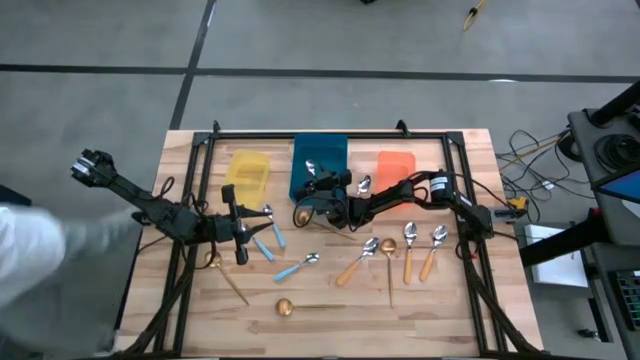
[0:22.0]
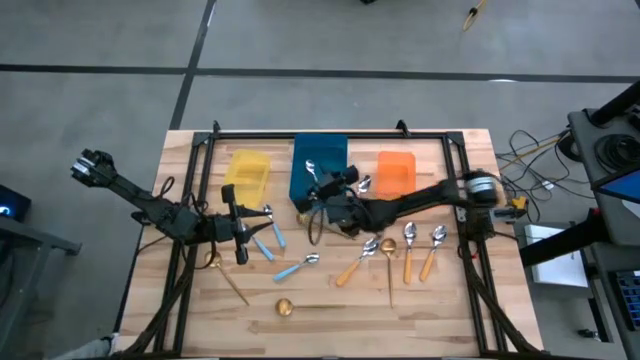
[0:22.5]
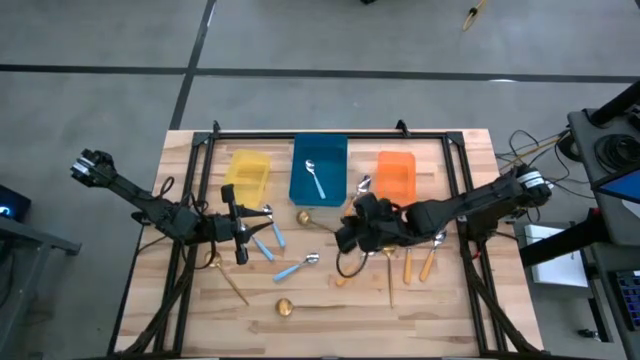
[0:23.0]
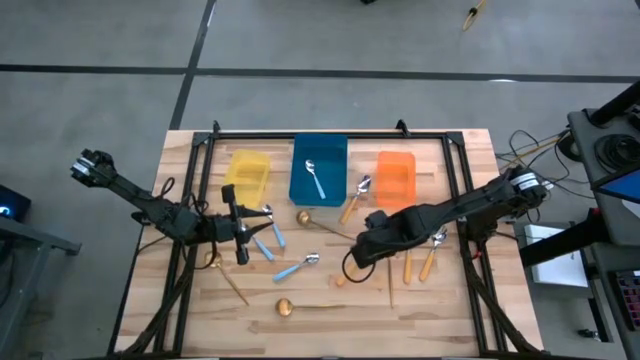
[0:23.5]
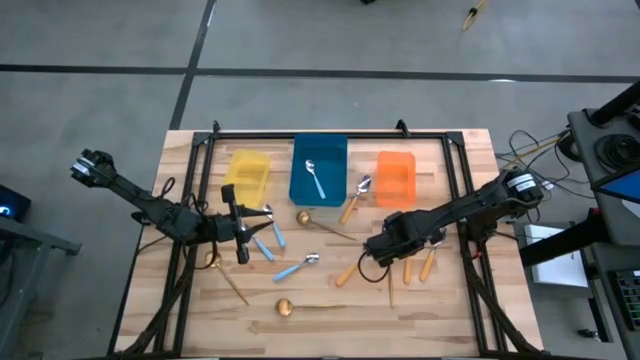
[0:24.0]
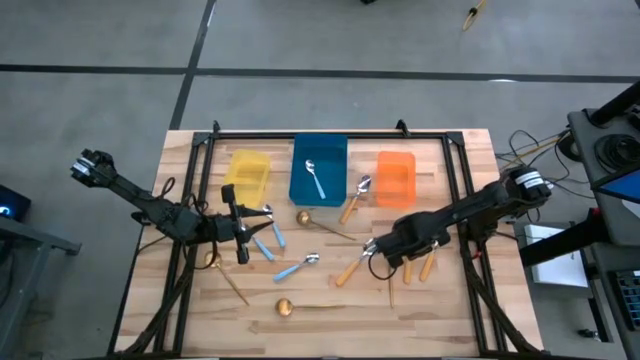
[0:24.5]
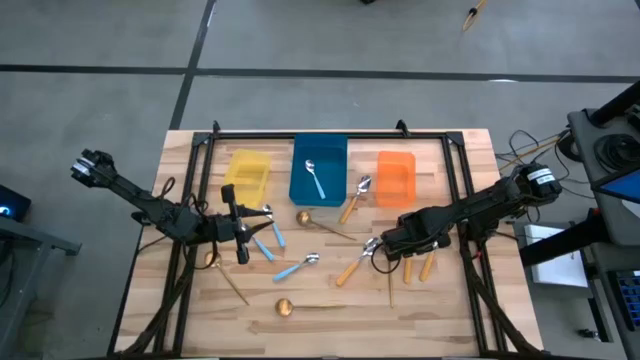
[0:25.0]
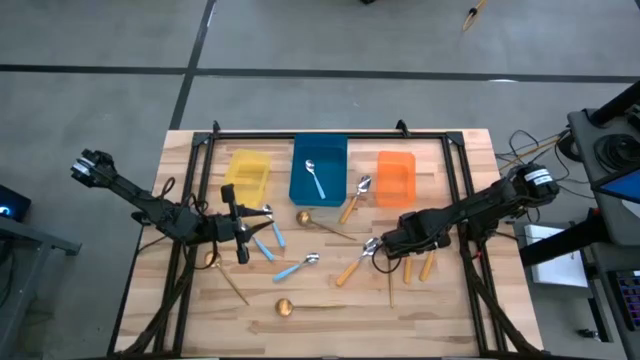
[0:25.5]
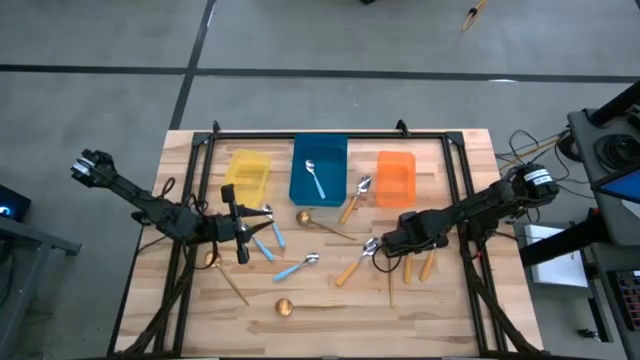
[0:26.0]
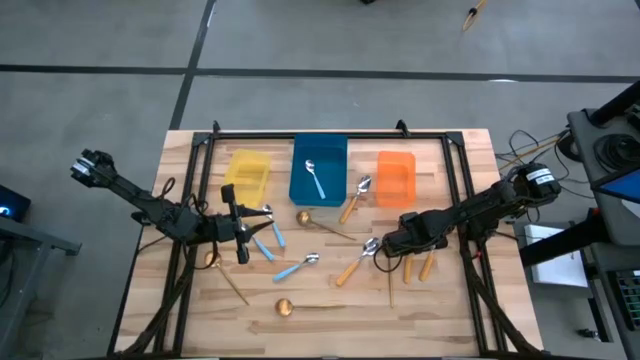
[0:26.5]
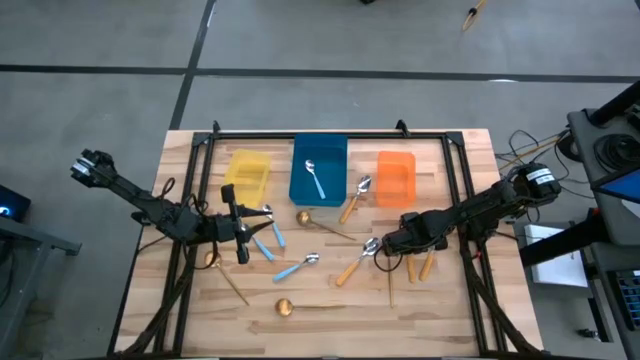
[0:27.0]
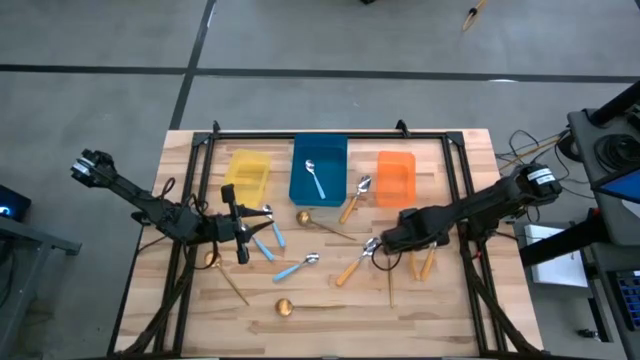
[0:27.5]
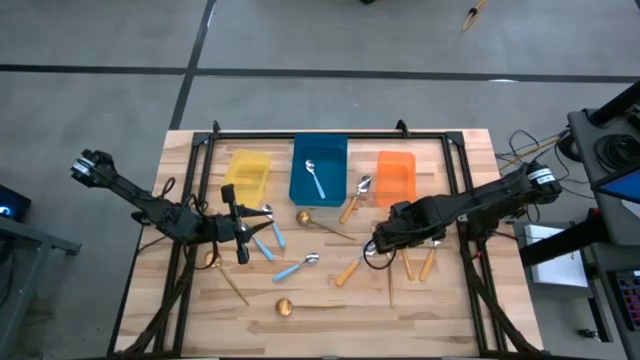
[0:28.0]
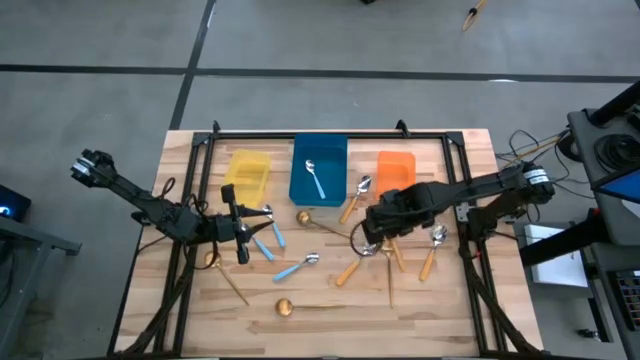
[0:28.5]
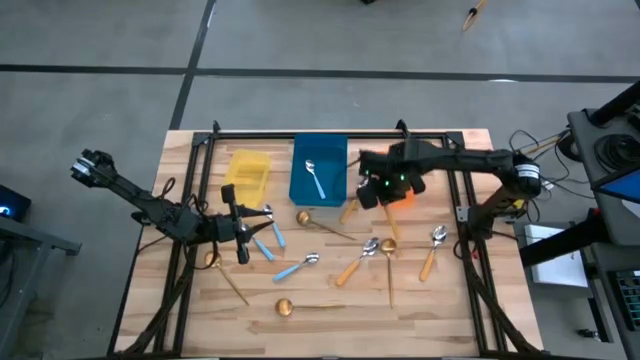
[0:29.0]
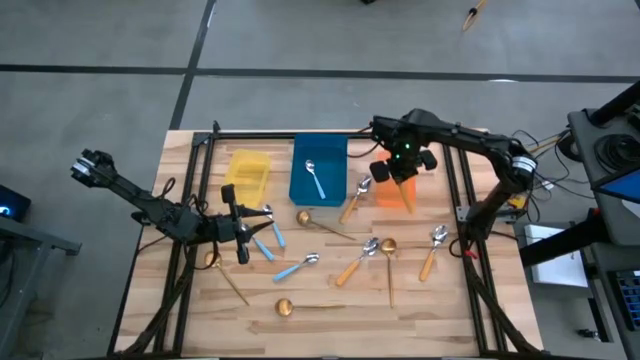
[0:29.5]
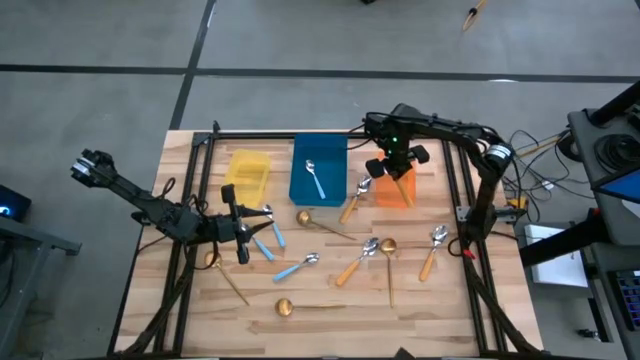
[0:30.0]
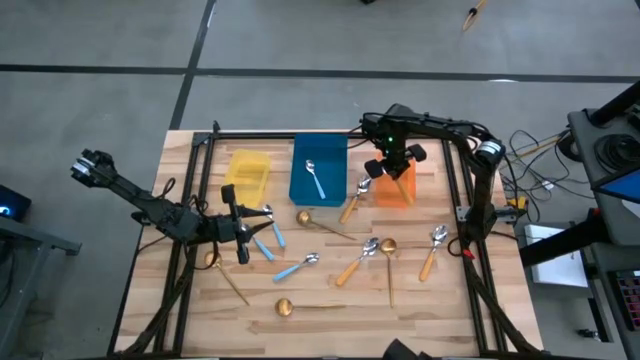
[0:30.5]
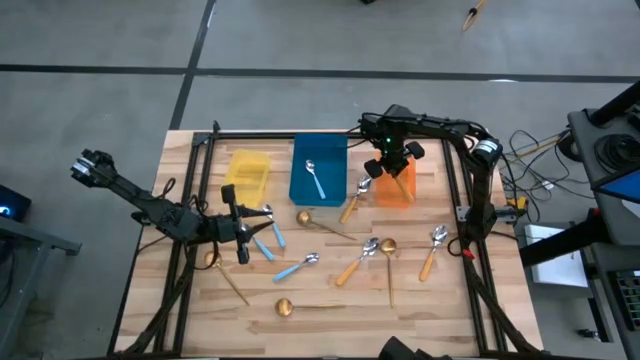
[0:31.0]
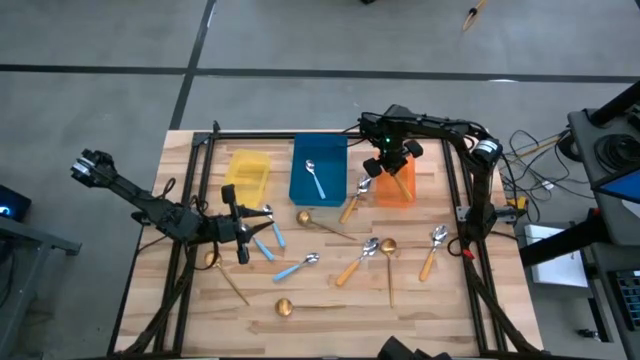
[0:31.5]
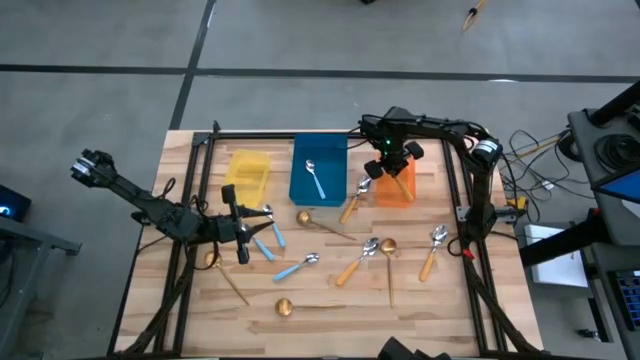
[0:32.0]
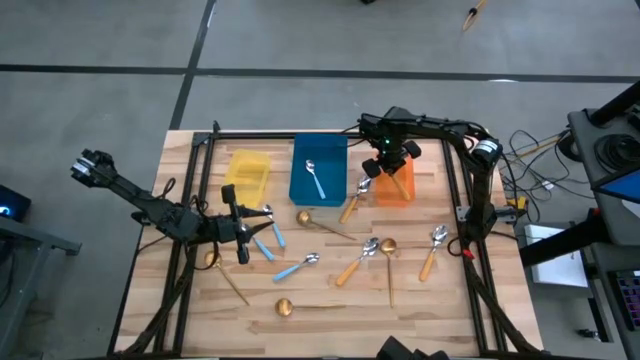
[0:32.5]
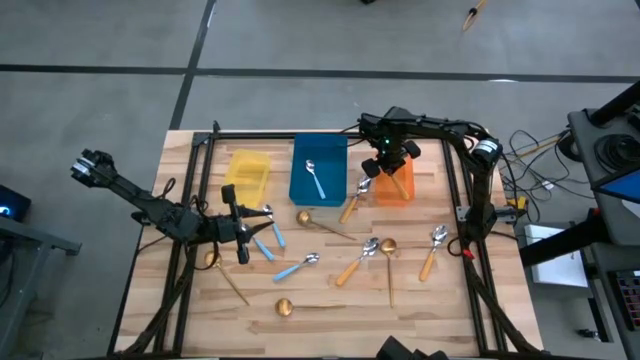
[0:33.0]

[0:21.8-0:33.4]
Task: Sort silverware by color (type)
Put the yellow spoon into the orange bin

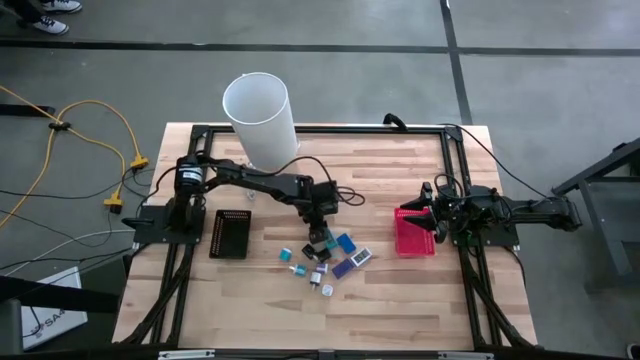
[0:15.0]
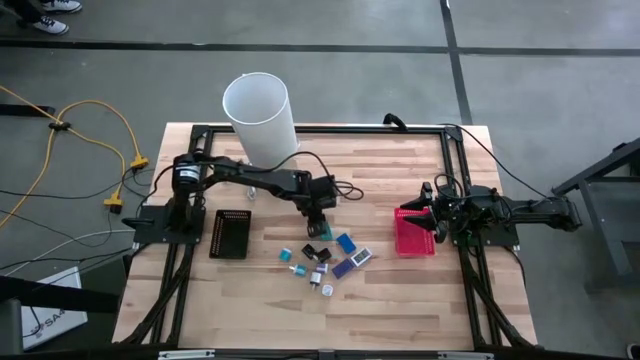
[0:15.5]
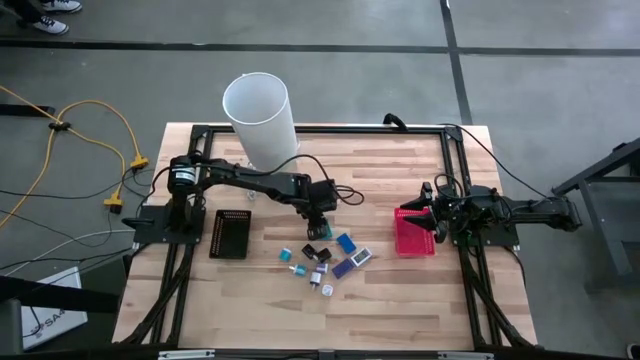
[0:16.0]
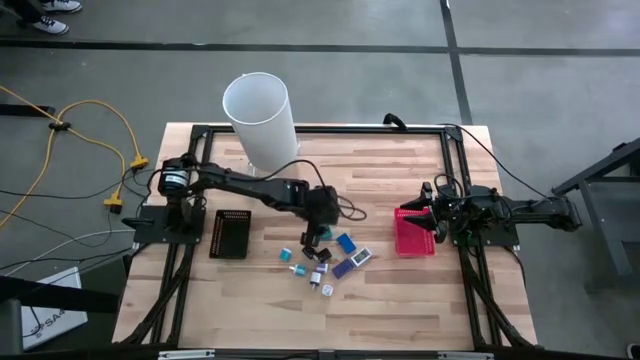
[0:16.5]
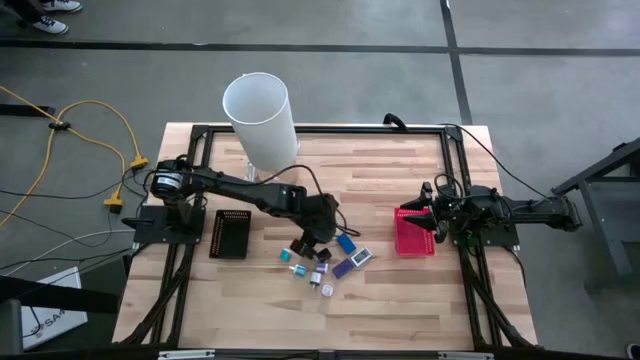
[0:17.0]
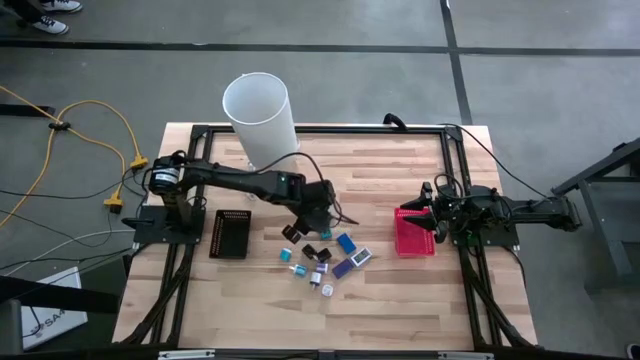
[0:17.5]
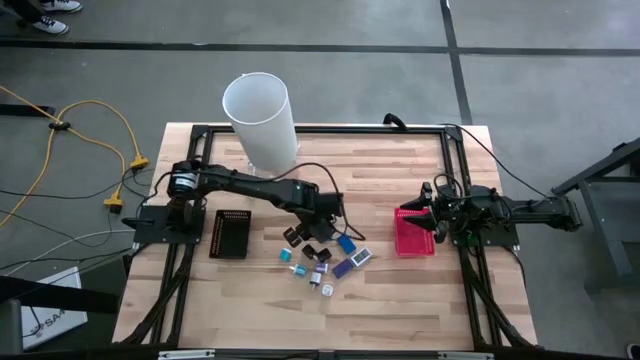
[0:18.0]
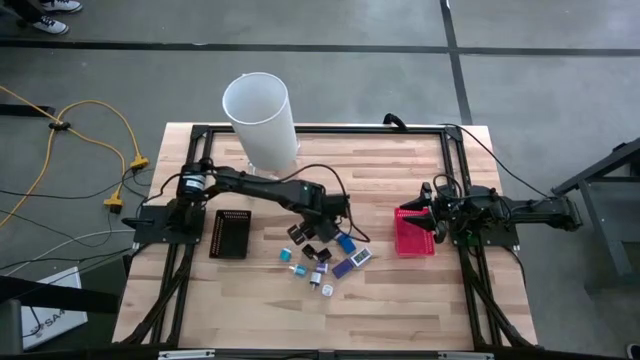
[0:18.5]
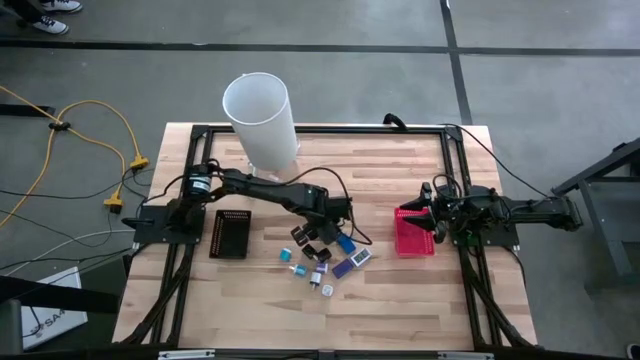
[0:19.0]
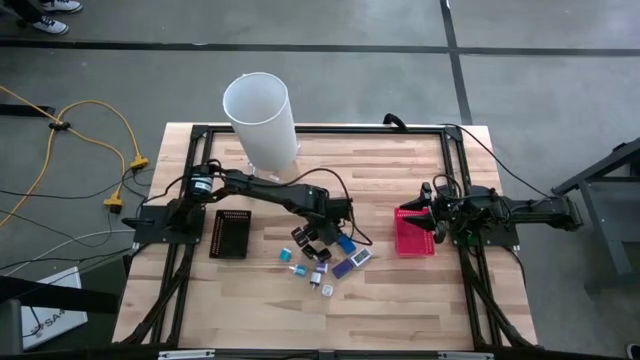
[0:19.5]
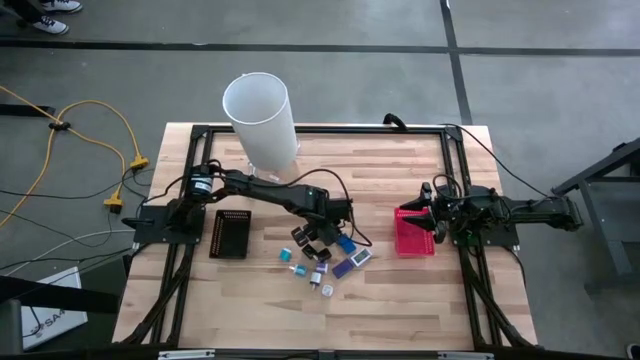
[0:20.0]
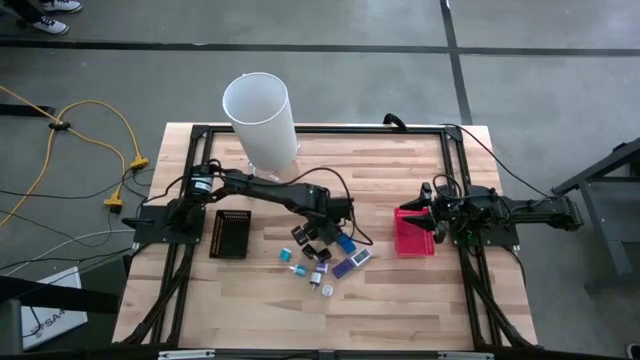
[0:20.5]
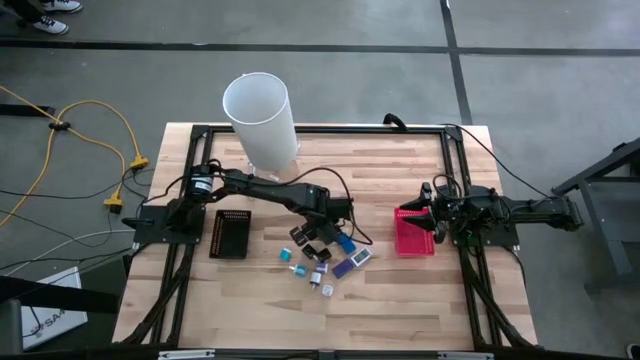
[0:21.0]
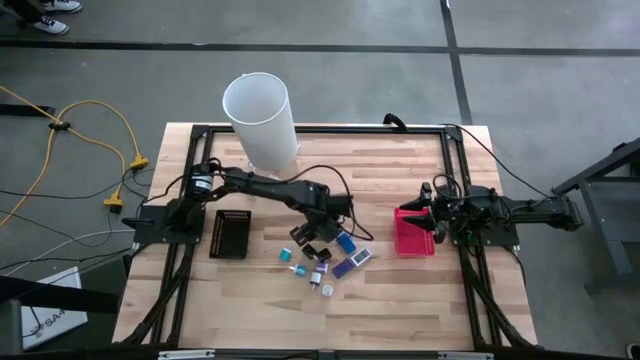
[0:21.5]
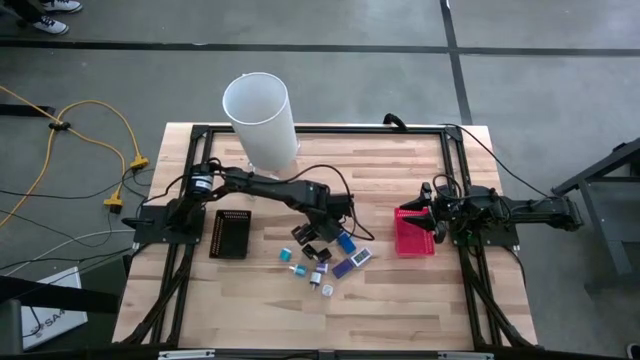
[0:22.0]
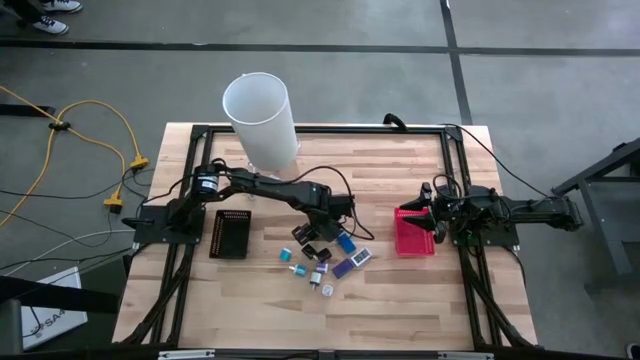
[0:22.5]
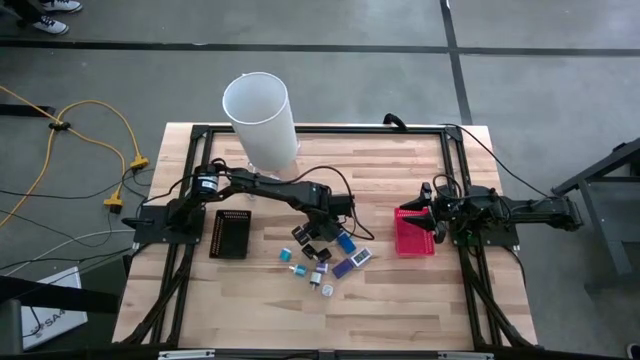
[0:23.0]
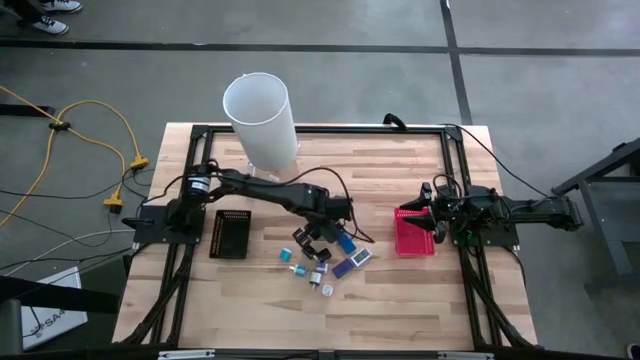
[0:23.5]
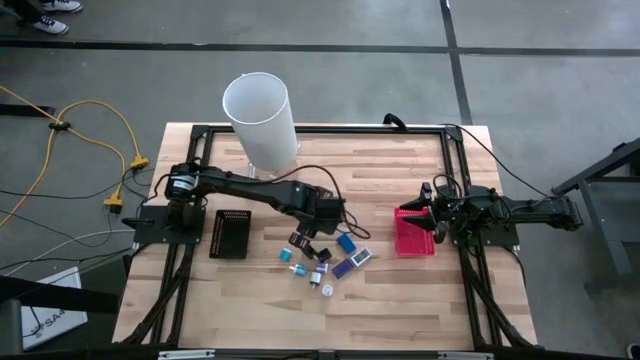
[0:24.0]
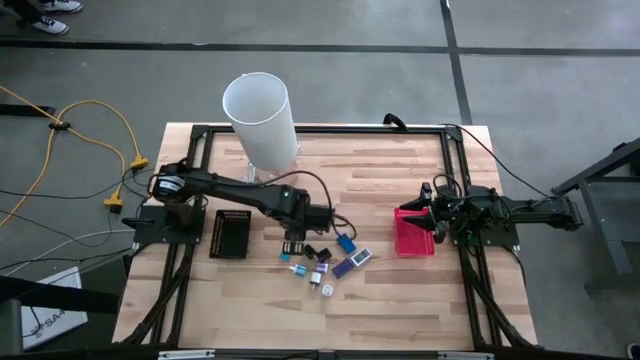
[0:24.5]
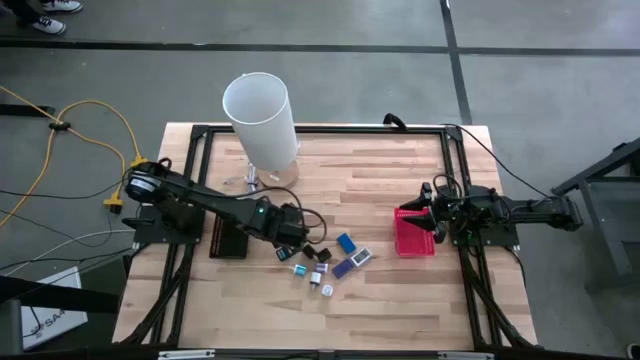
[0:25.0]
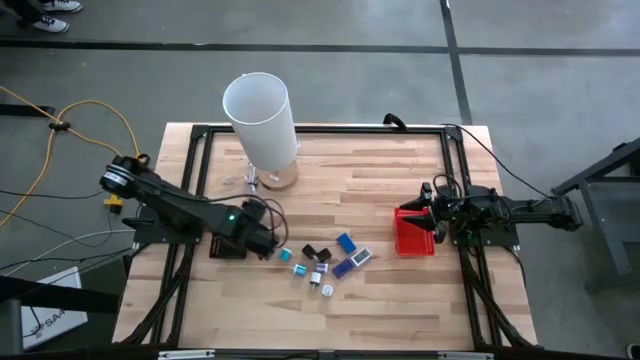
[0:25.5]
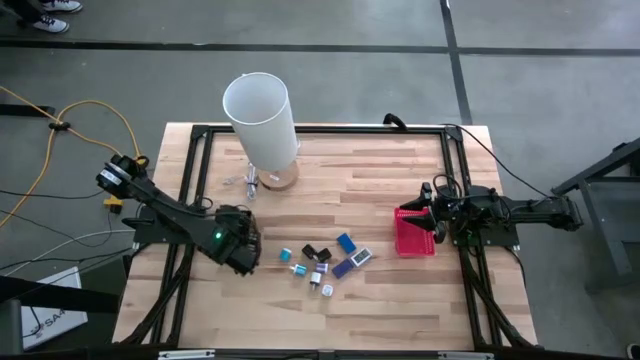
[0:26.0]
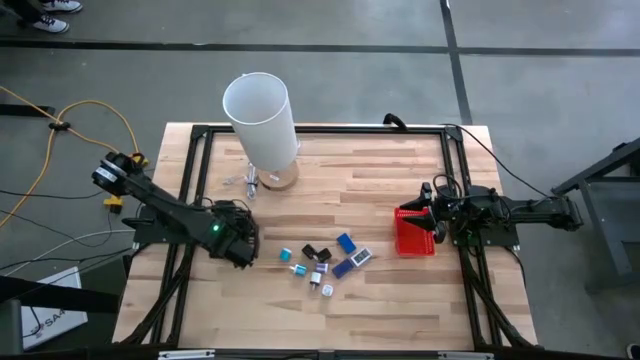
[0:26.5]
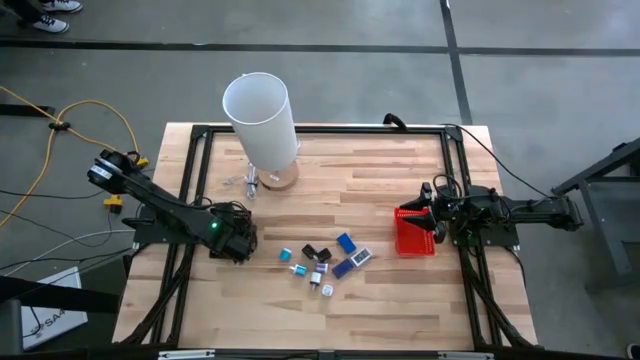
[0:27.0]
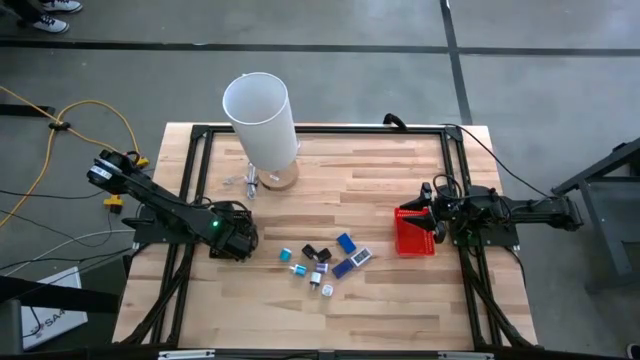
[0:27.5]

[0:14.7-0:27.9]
Task: Pick & Place Office items
Put the blue digital timer into the black bin
